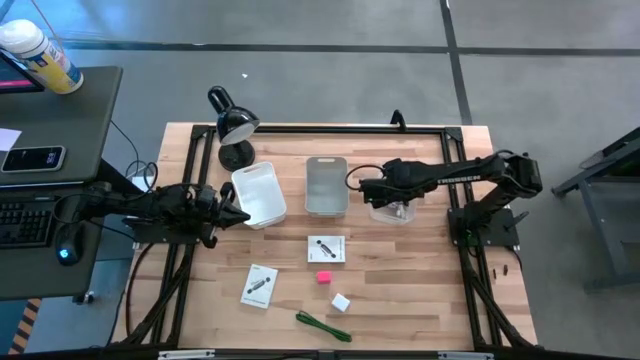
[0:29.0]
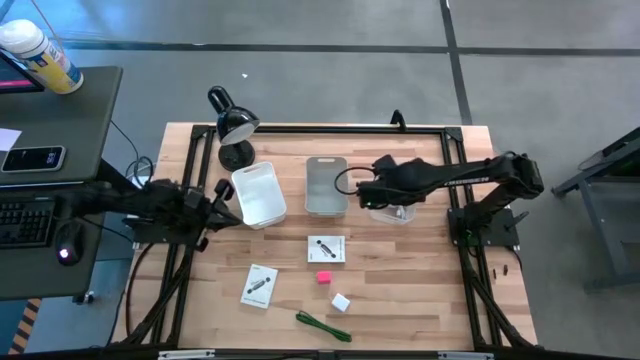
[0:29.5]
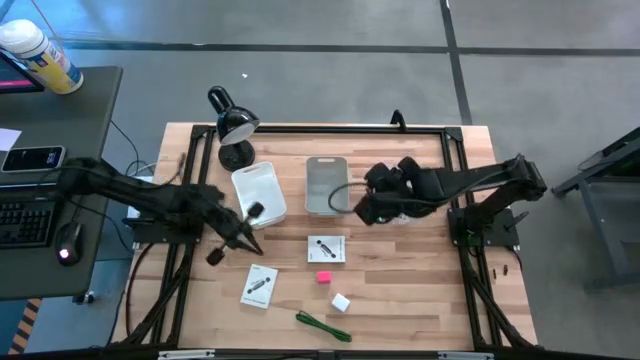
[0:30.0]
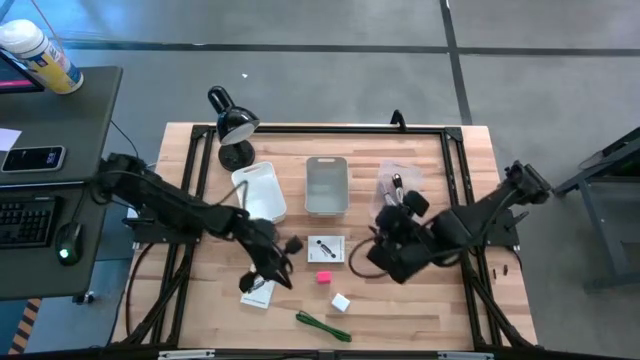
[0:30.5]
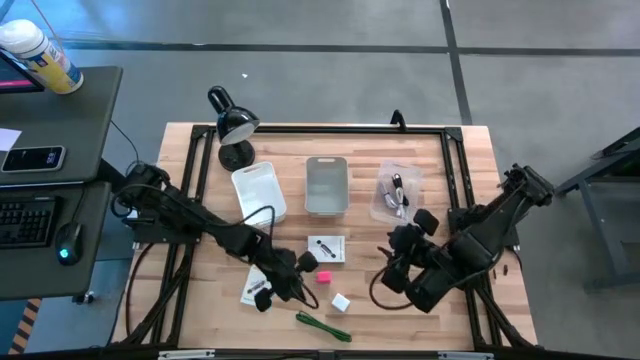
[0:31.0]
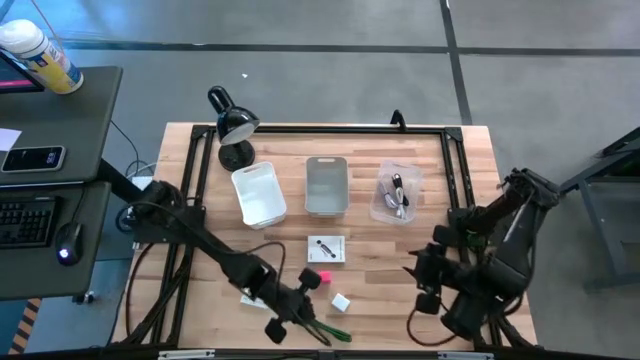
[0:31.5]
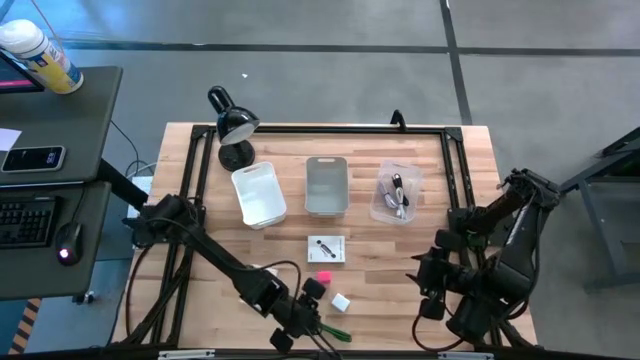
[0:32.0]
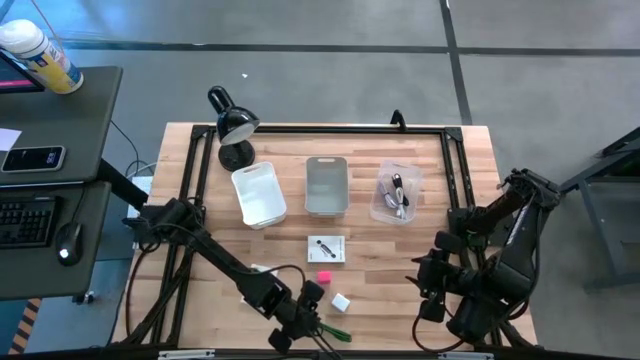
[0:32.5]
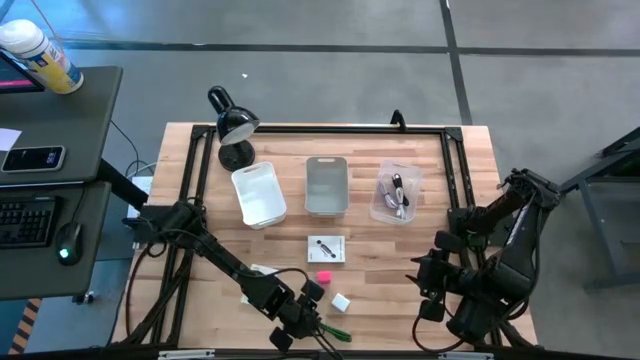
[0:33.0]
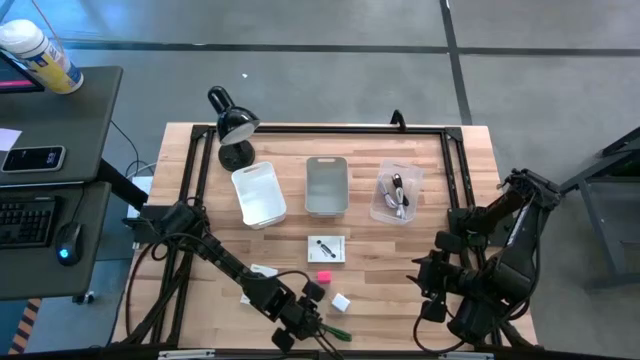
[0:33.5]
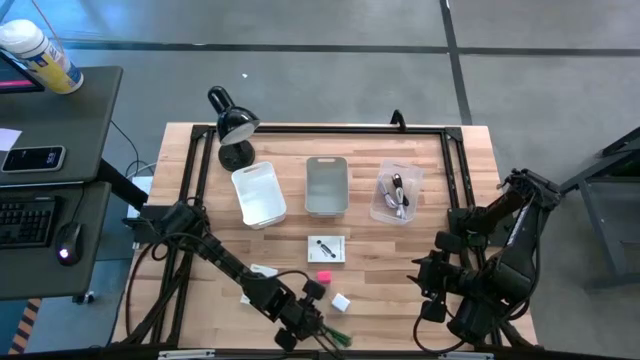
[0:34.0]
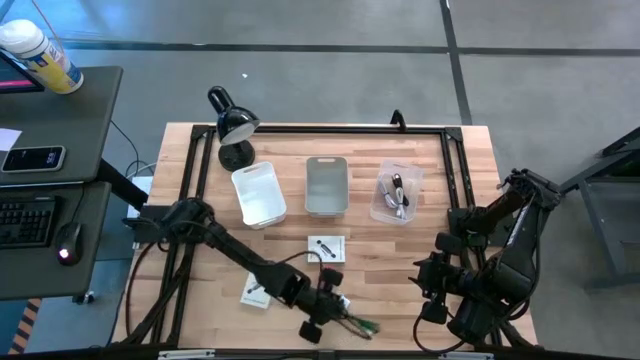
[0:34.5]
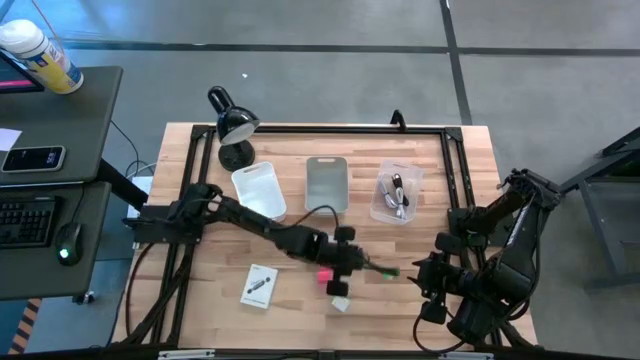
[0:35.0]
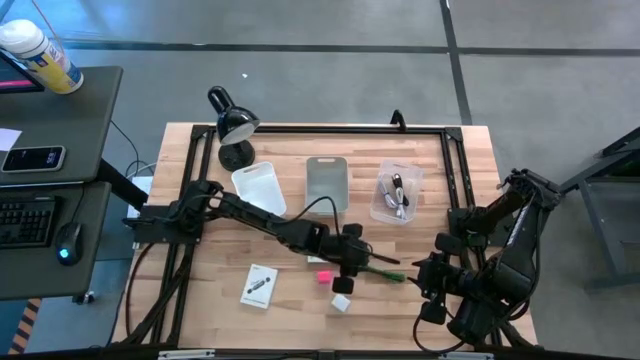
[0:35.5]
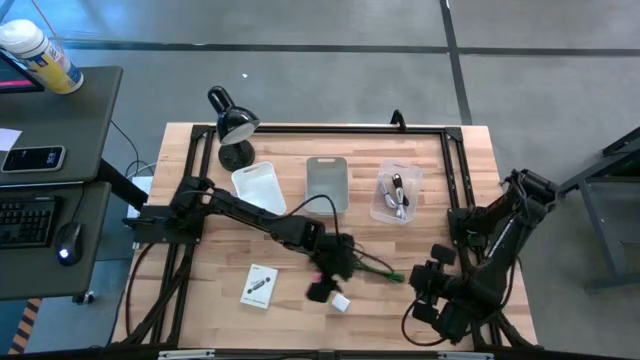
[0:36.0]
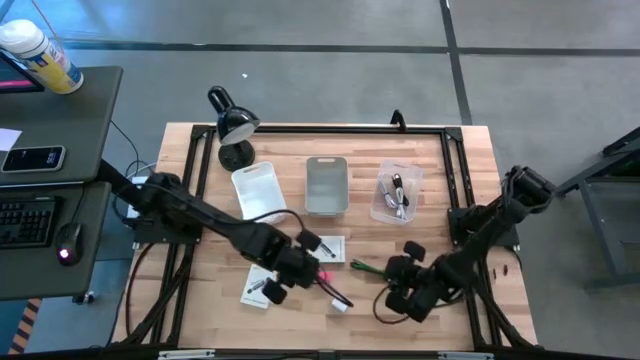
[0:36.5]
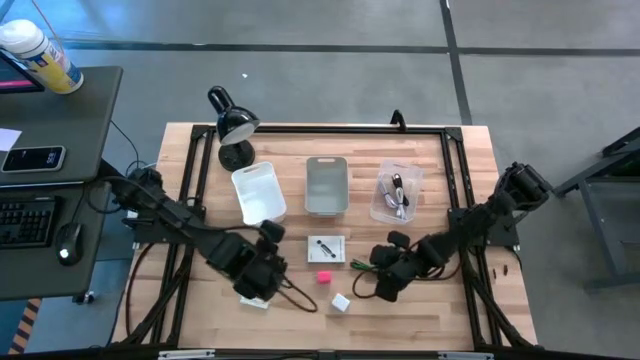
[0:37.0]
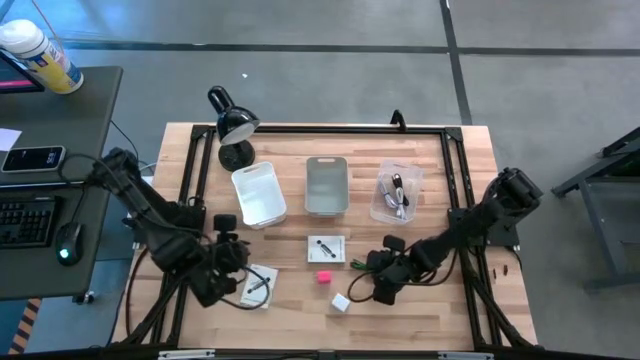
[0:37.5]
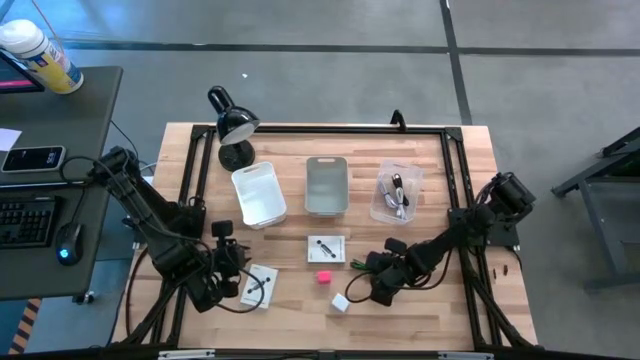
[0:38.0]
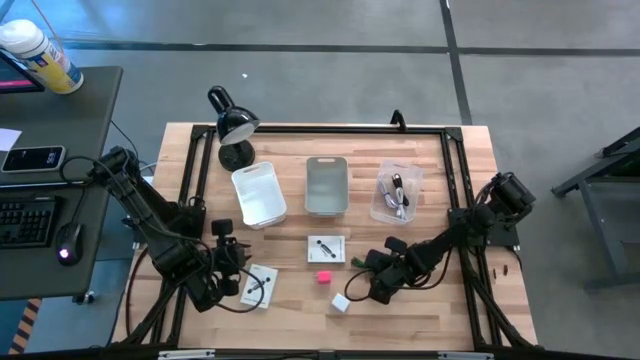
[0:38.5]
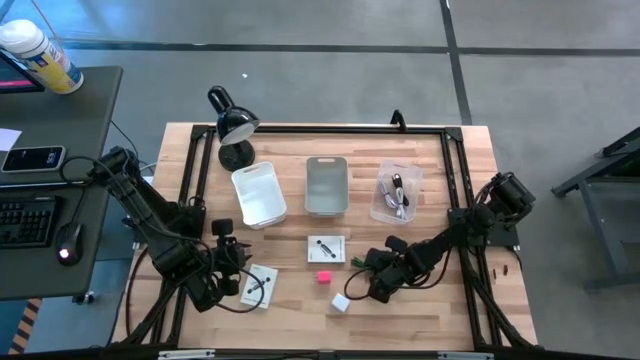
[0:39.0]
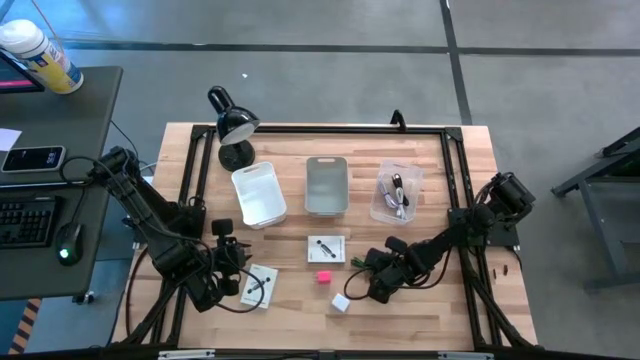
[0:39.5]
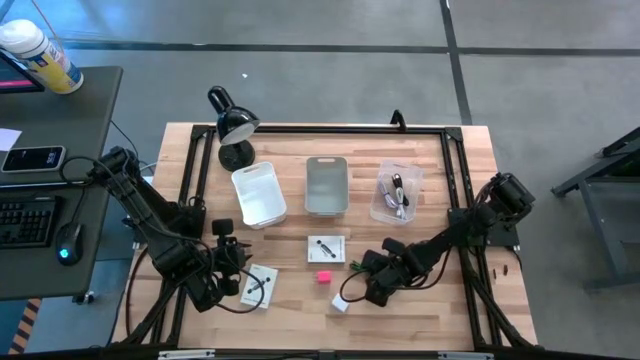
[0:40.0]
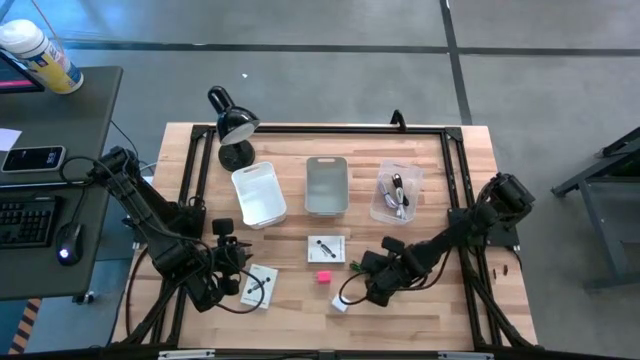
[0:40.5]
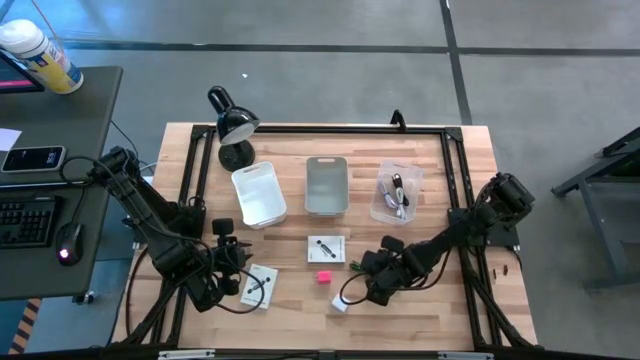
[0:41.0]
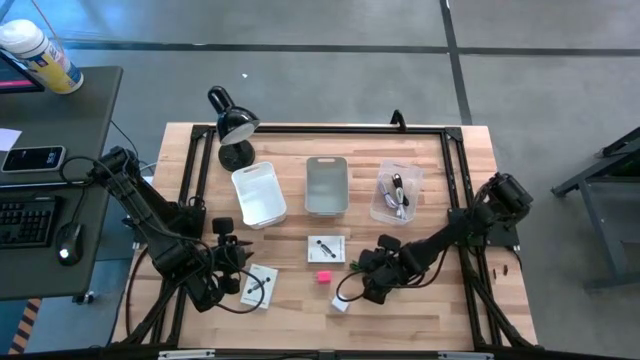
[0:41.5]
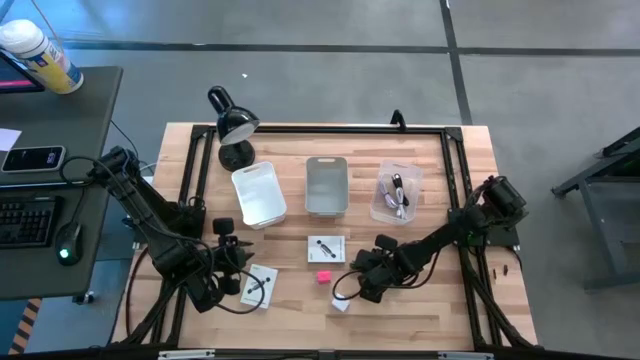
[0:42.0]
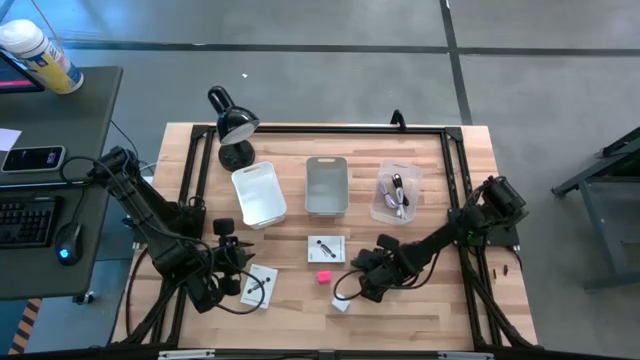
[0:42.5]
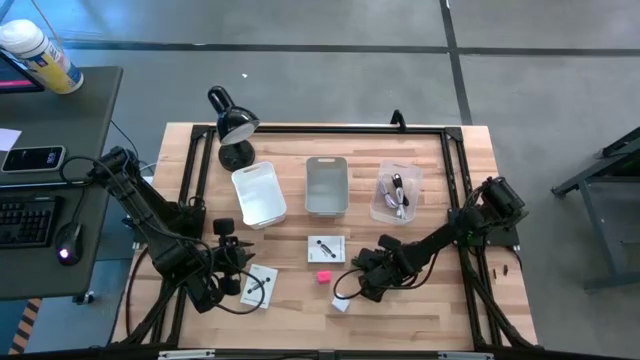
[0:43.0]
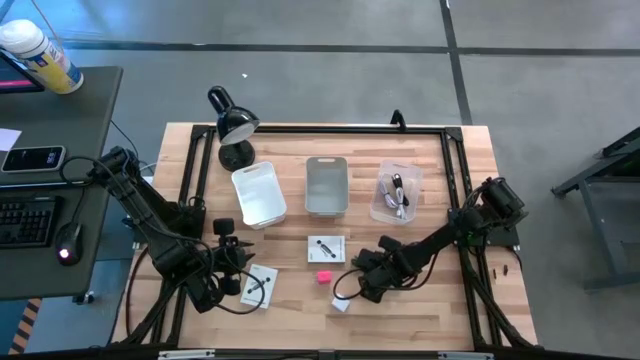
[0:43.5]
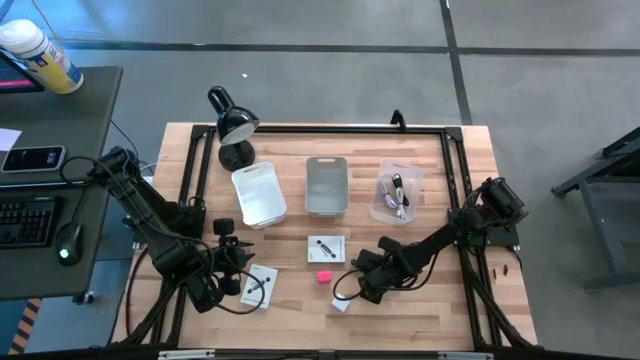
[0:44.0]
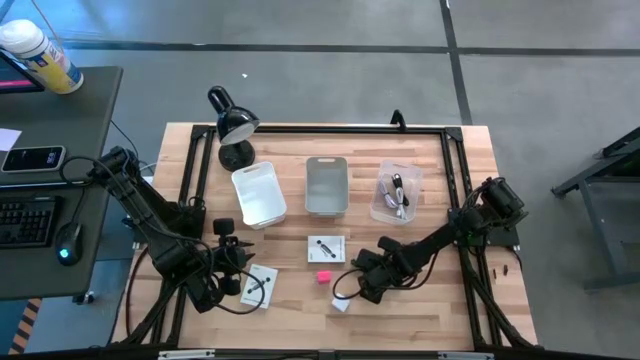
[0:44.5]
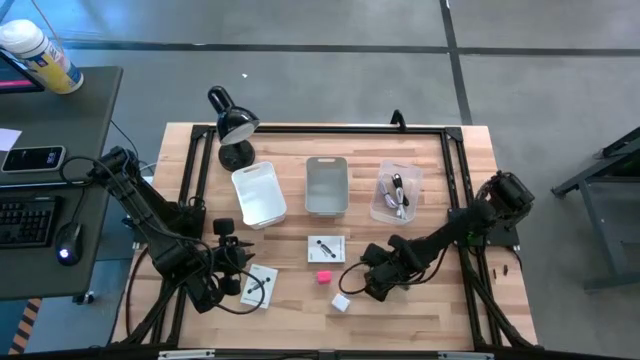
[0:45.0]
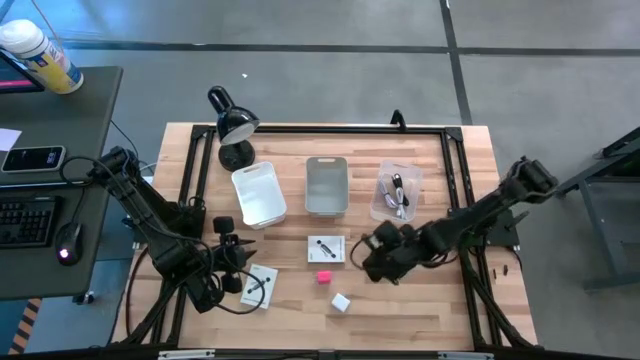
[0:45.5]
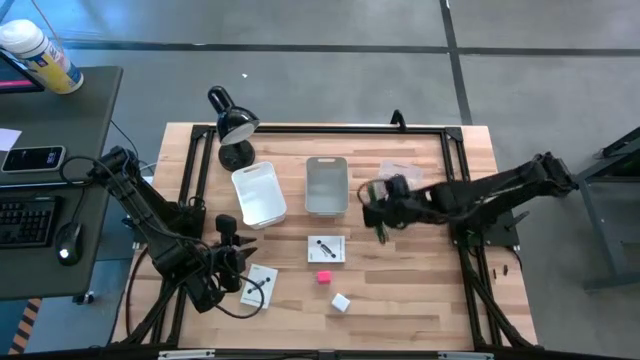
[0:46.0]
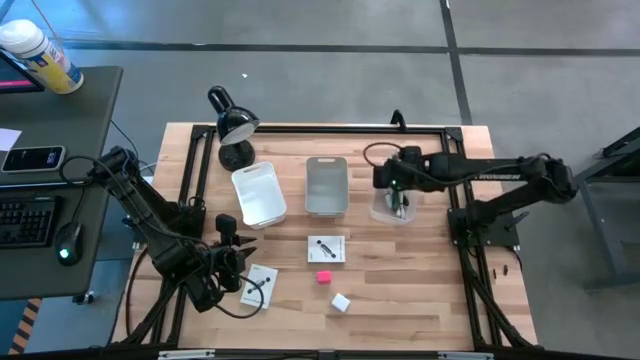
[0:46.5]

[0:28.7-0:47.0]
Task: Pick and place items into bin
Put the green charger cable into the transparent bin
